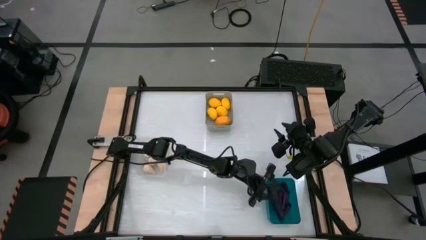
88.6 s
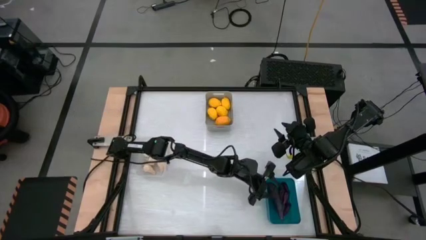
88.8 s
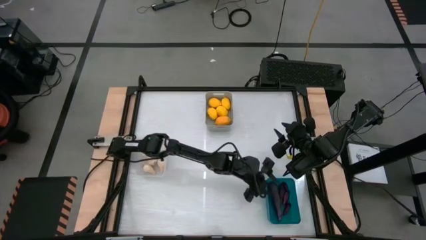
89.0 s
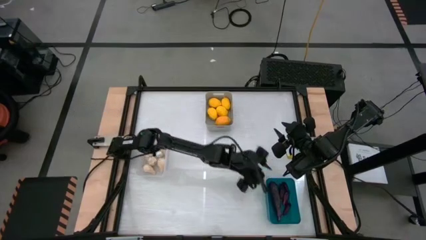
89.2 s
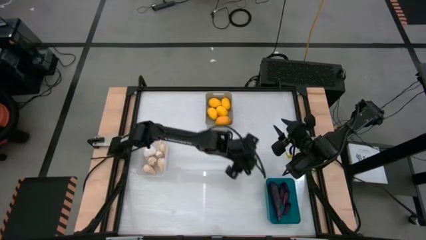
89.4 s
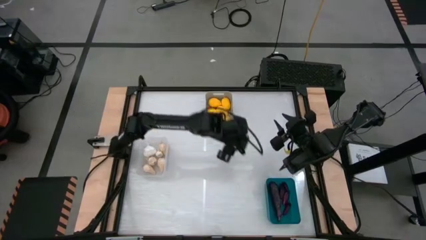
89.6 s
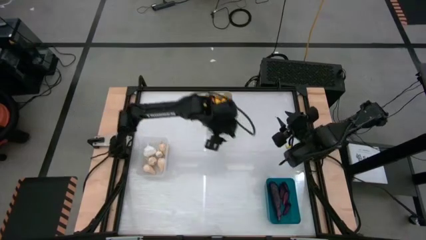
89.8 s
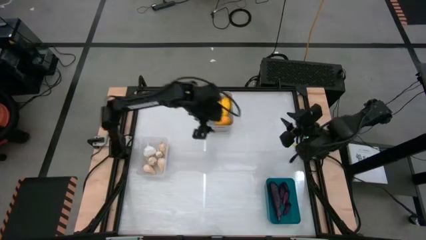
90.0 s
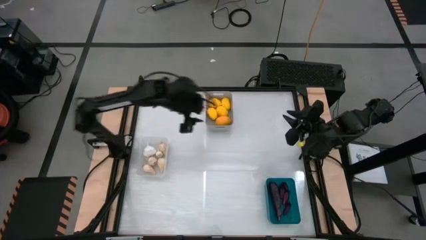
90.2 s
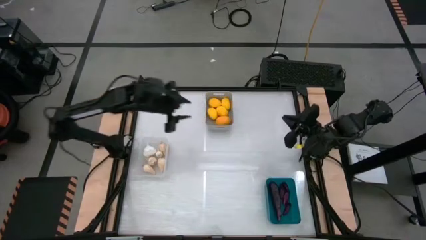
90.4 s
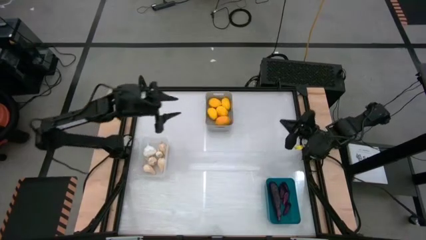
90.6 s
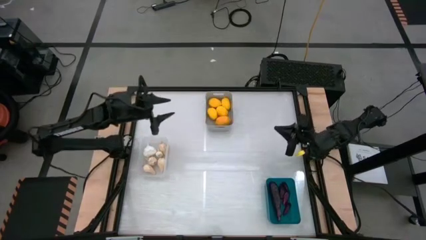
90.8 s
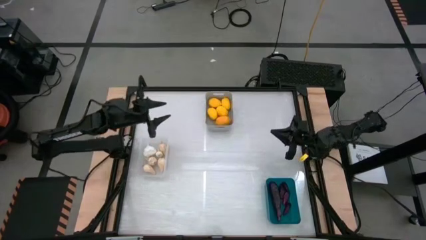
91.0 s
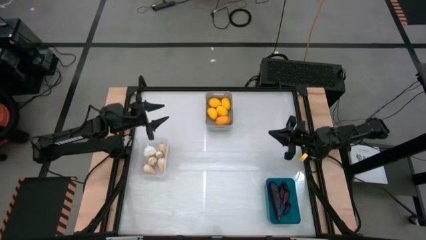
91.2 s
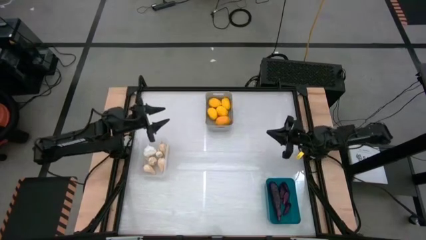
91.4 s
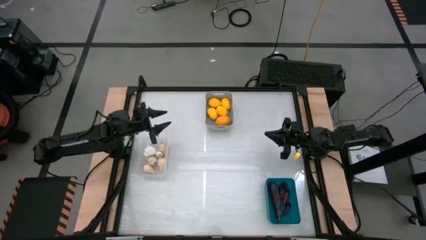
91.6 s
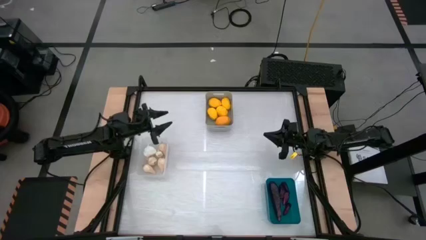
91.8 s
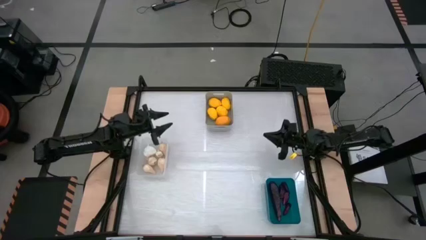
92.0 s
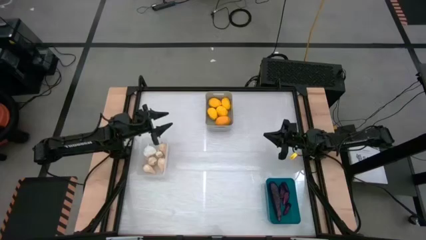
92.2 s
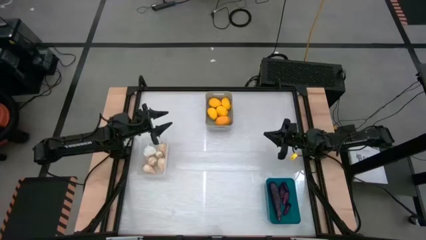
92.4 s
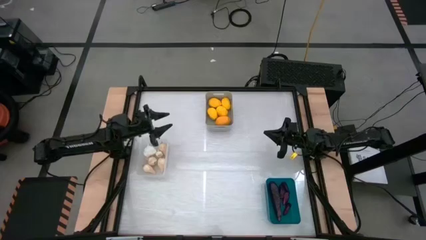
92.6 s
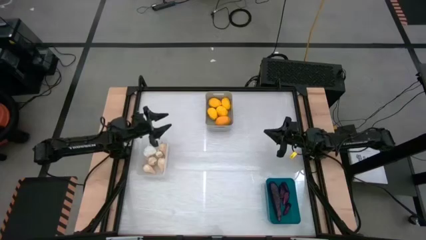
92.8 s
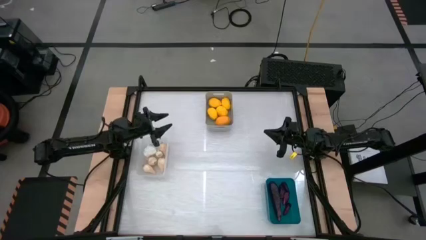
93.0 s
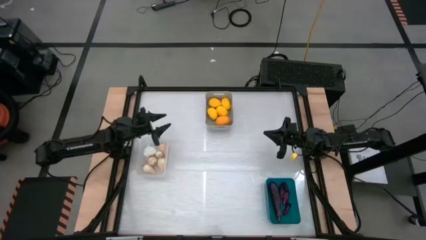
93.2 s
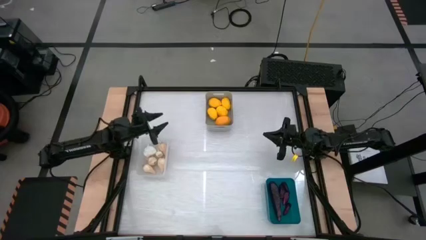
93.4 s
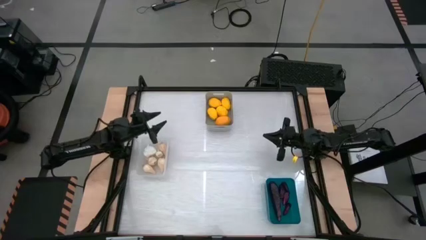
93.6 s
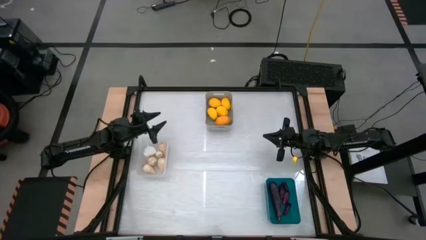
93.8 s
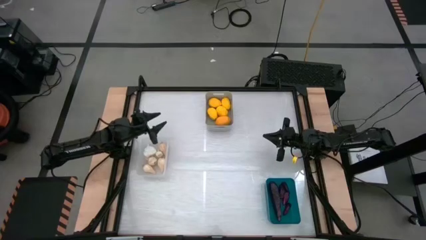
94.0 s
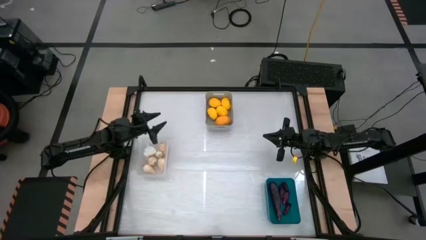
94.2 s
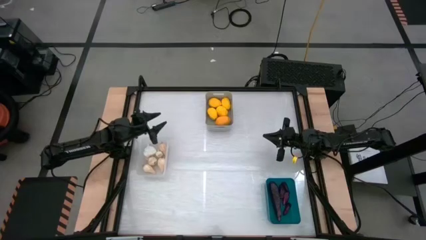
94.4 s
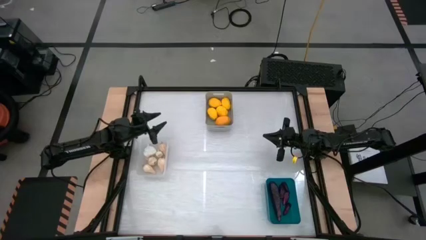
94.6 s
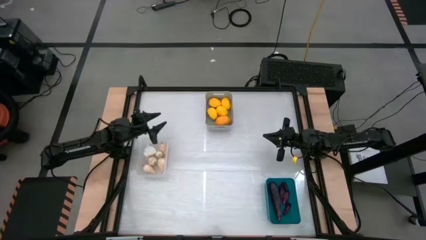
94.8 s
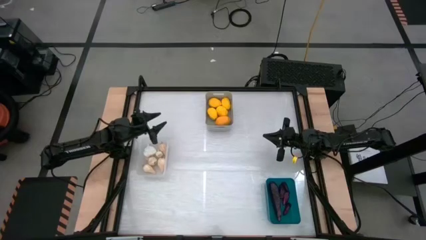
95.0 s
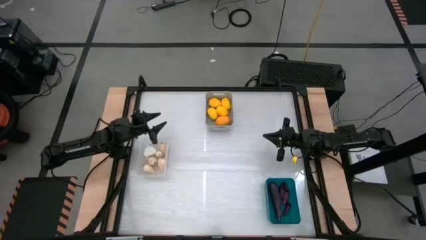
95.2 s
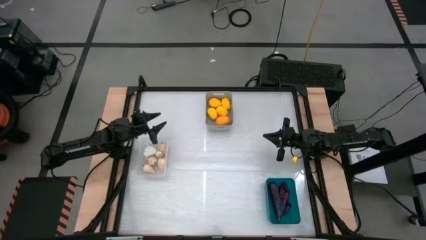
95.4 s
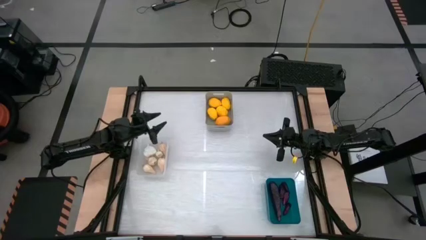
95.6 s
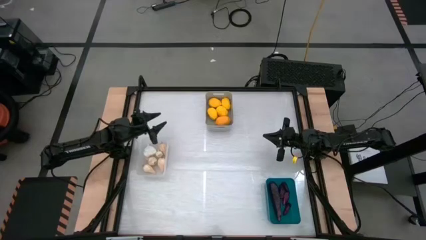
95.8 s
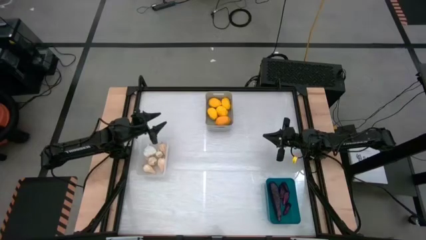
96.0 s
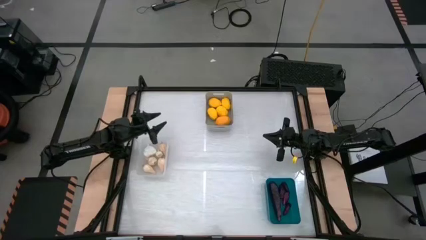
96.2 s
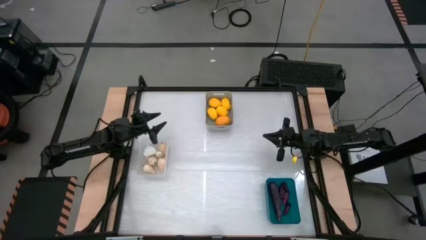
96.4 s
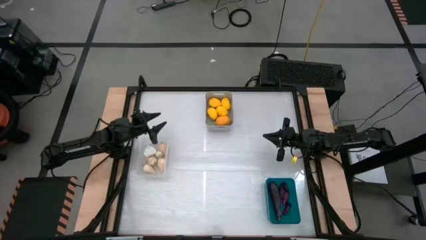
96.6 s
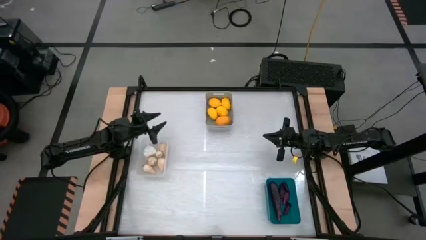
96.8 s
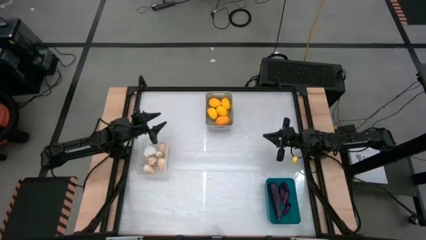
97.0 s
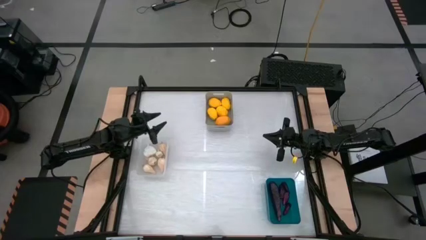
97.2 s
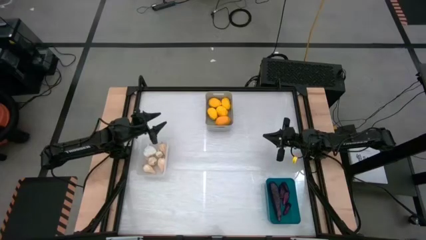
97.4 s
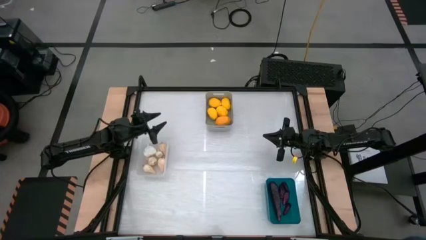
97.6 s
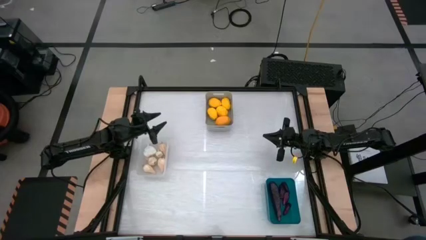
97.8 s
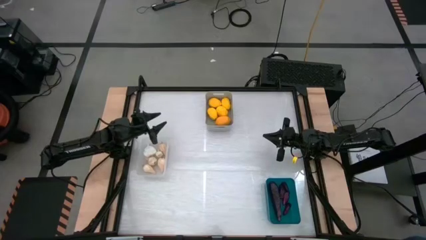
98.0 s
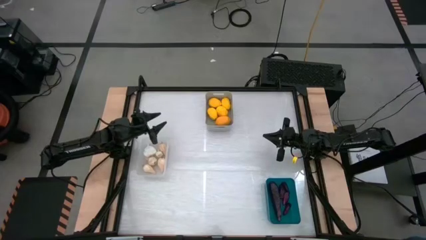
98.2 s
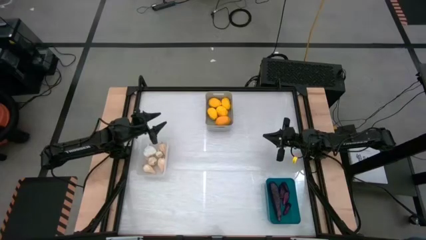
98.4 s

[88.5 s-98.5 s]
Task: Sort produce into baskets
Return to Home Position

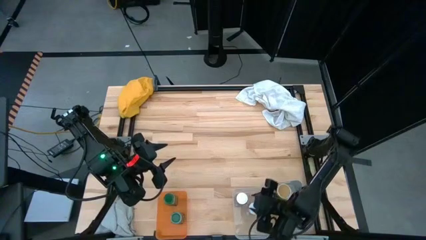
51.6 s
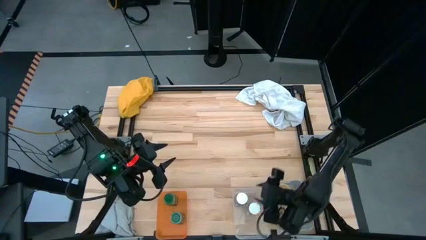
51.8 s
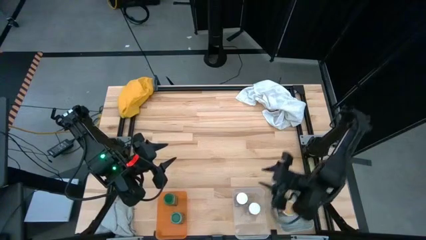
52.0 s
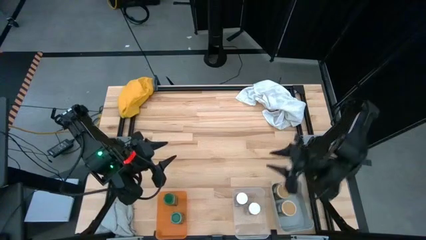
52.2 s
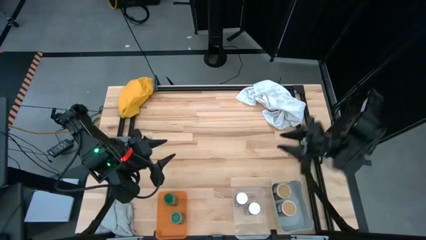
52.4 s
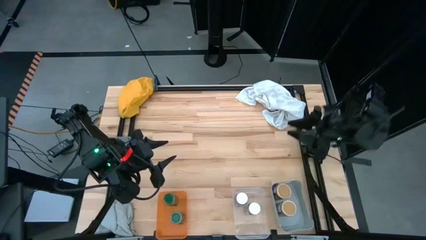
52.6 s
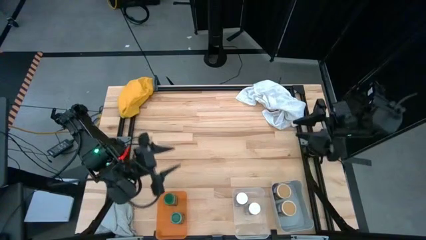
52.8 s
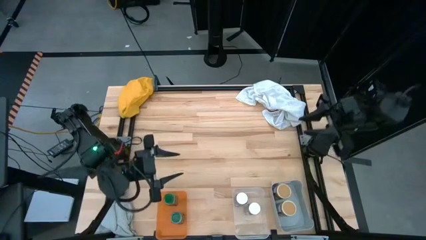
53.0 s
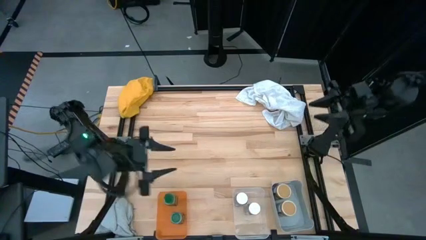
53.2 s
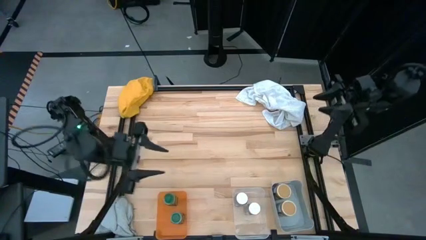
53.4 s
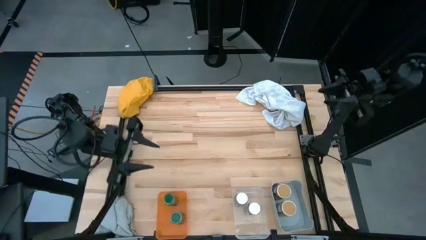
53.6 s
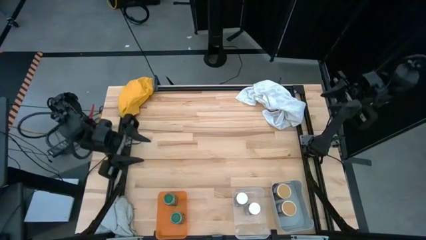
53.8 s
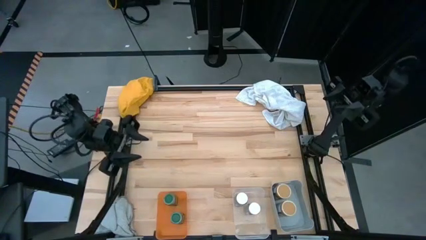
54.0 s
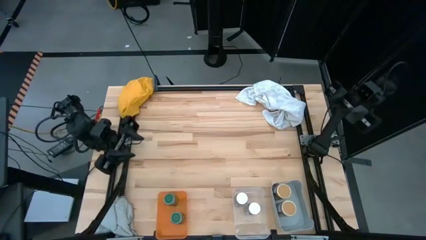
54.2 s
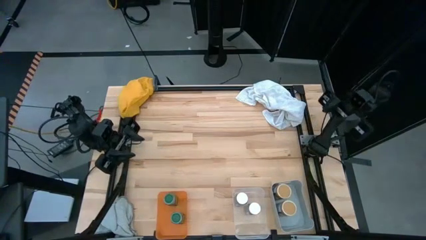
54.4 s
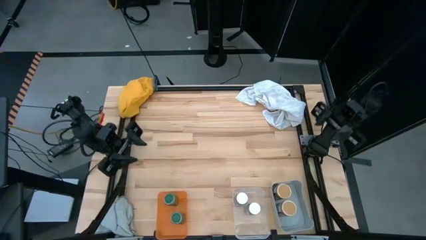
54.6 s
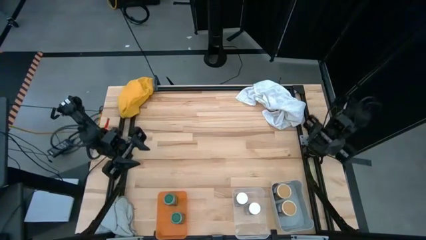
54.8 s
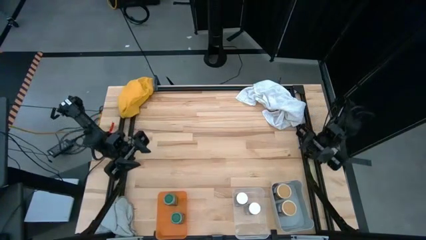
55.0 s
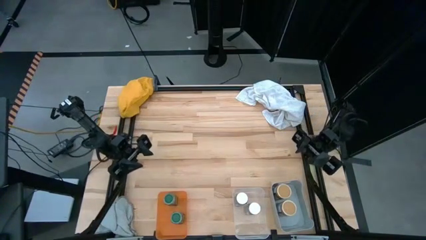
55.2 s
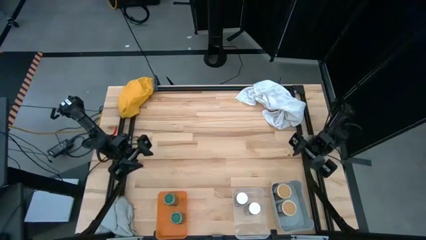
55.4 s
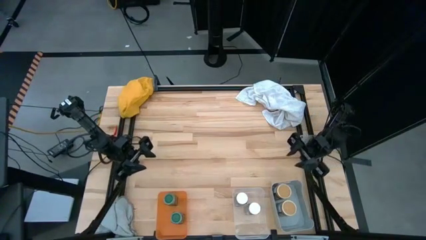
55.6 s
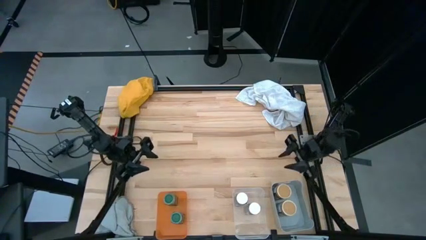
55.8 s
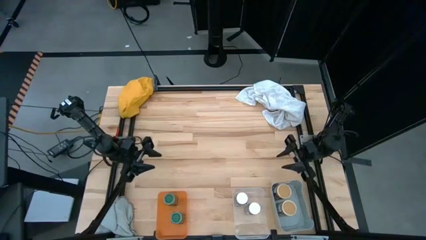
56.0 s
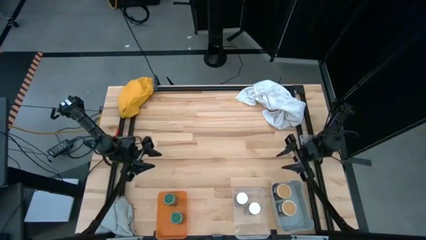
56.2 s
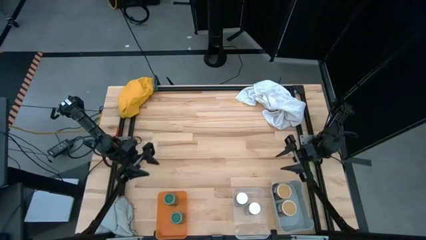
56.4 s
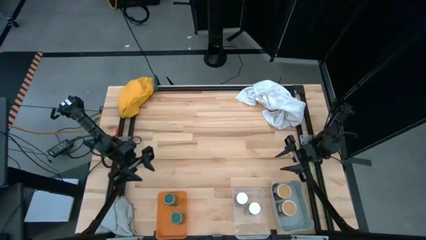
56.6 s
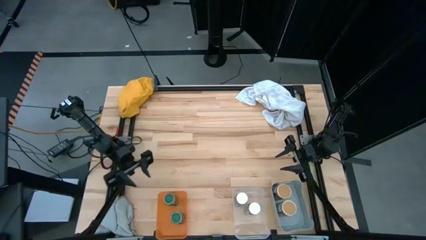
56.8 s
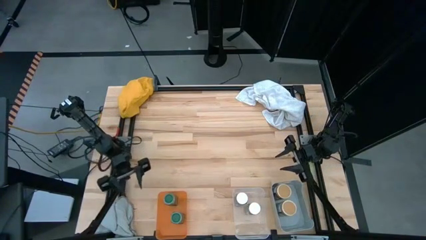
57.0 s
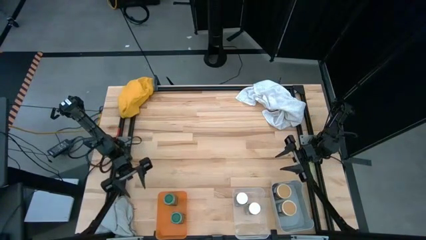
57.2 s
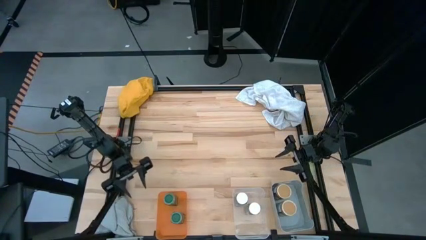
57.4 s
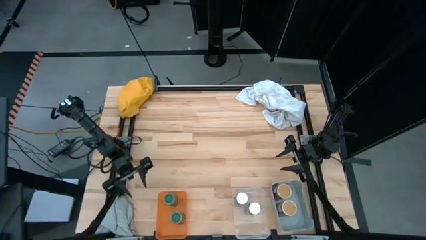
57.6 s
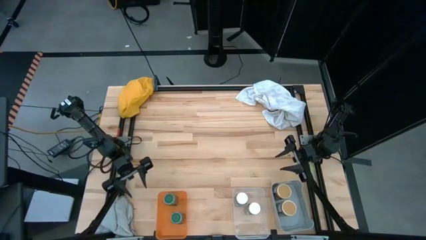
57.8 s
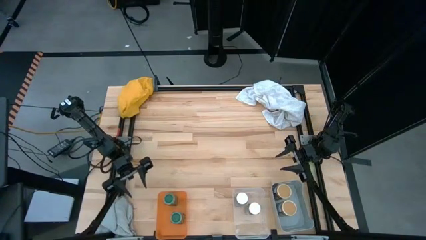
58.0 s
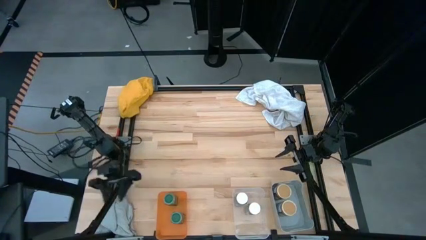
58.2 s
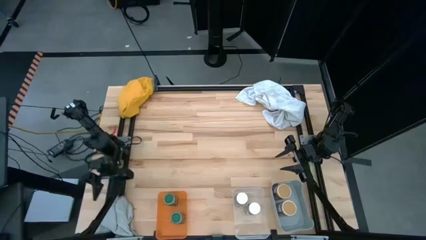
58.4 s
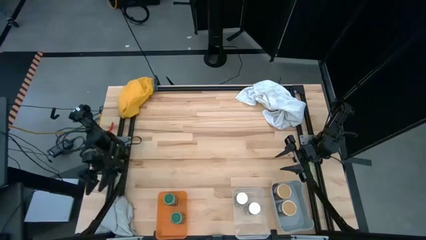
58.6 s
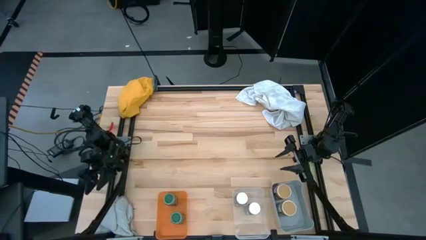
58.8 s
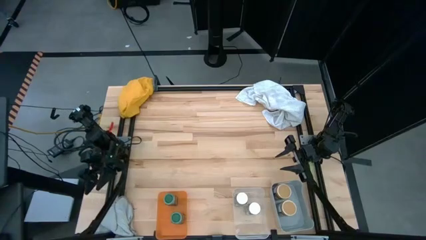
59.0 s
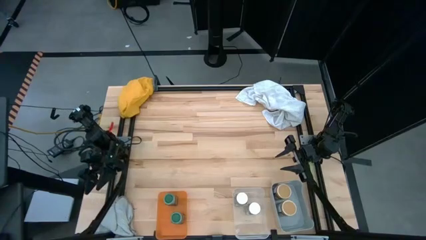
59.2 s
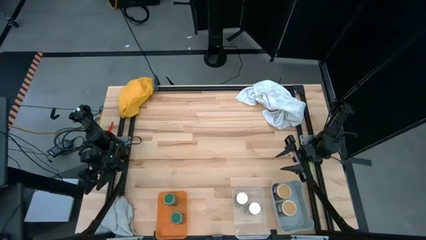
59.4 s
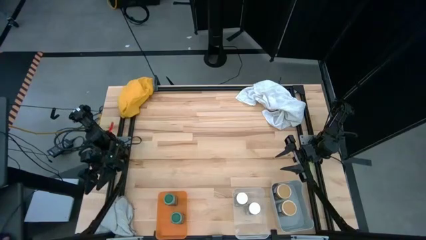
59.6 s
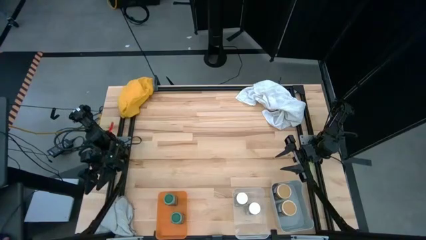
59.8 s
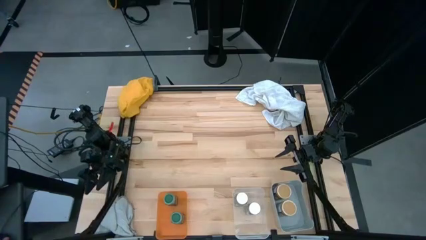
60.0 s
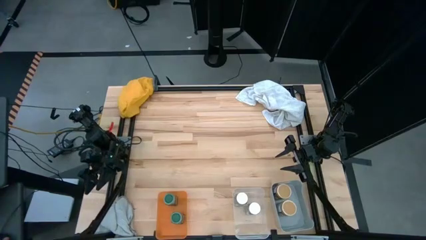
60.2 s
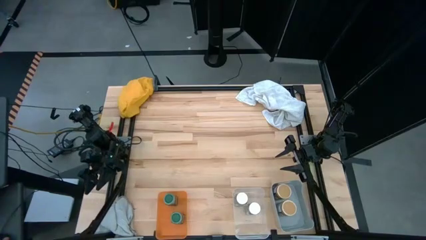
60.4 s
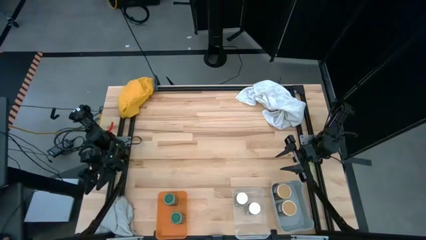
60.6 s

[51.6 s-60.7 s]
Task: Sort spices by type
Return to Home Position
